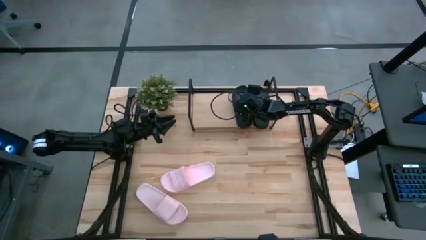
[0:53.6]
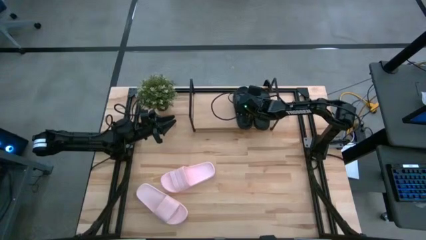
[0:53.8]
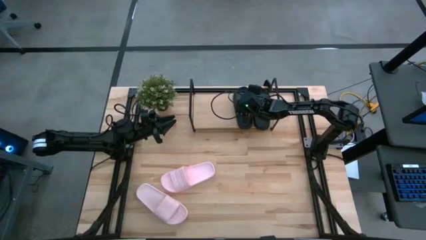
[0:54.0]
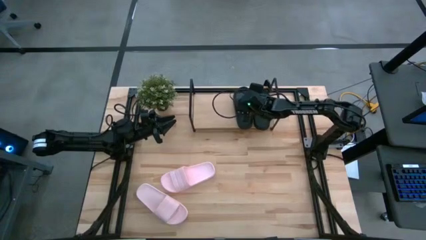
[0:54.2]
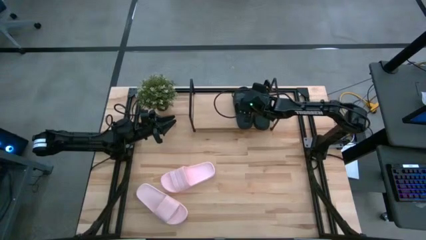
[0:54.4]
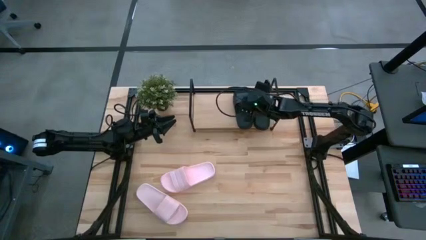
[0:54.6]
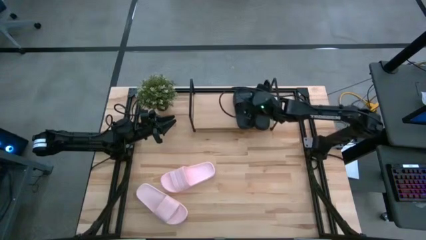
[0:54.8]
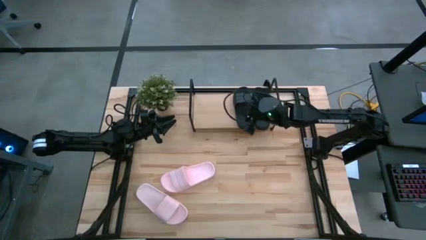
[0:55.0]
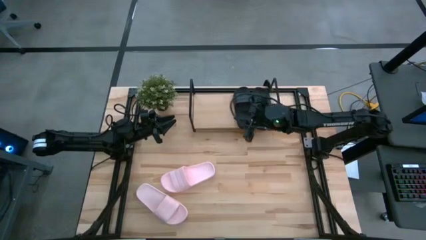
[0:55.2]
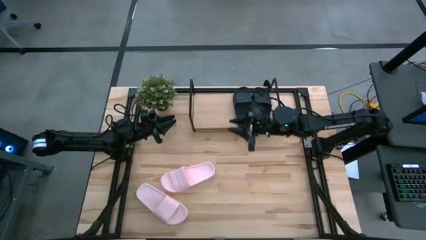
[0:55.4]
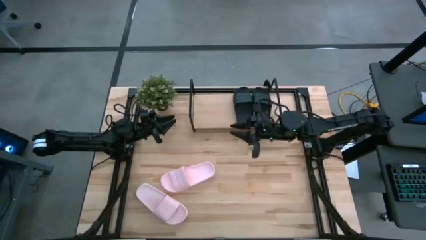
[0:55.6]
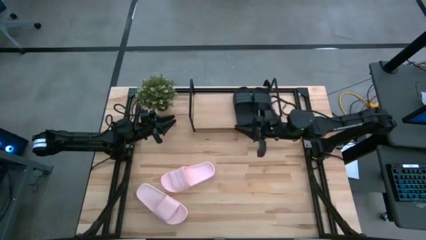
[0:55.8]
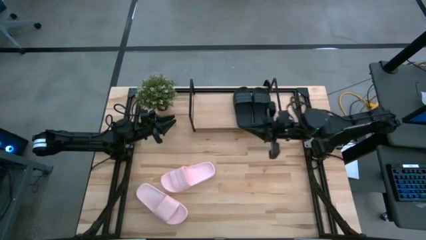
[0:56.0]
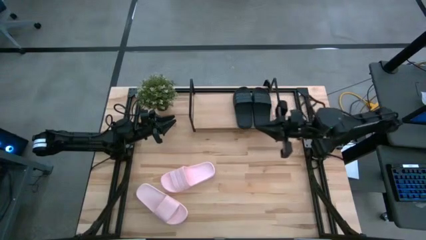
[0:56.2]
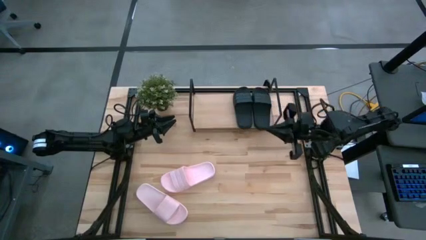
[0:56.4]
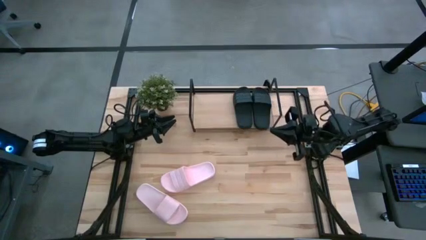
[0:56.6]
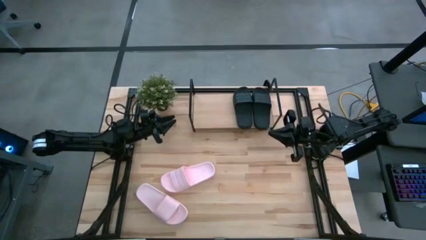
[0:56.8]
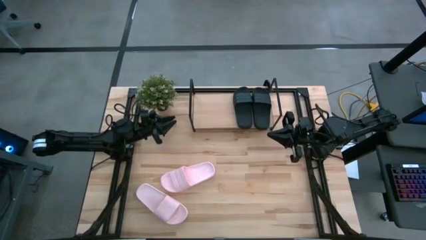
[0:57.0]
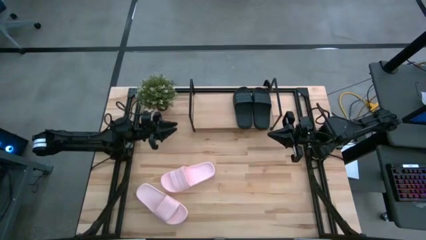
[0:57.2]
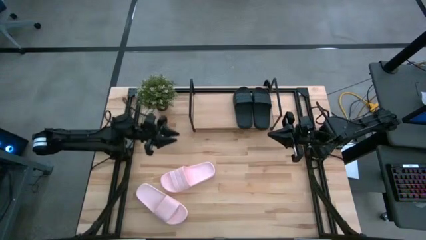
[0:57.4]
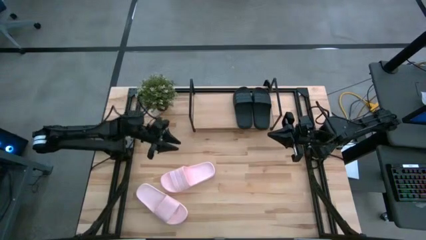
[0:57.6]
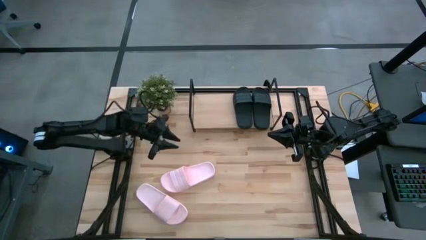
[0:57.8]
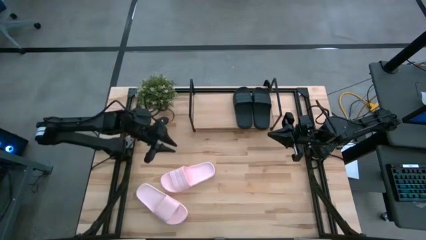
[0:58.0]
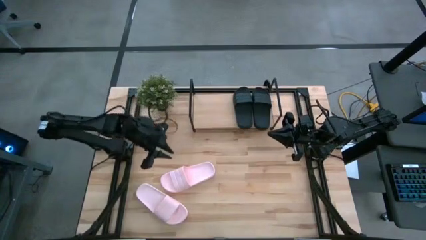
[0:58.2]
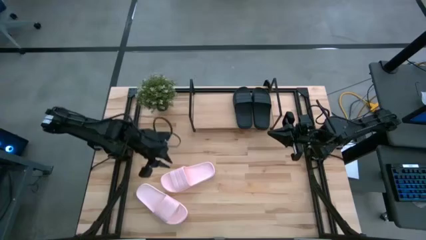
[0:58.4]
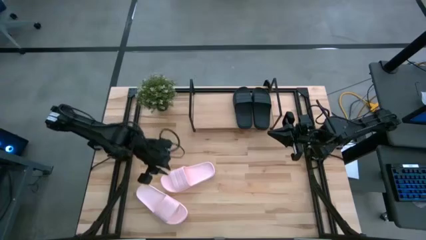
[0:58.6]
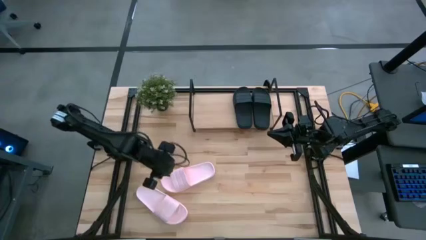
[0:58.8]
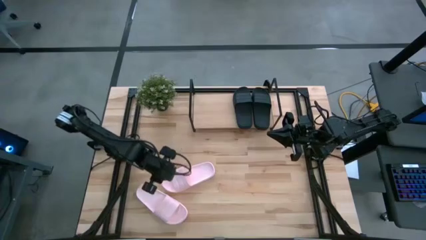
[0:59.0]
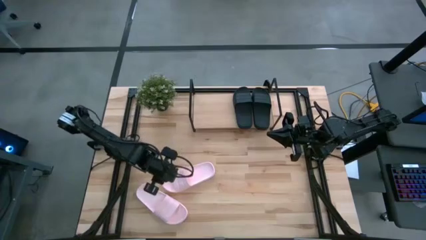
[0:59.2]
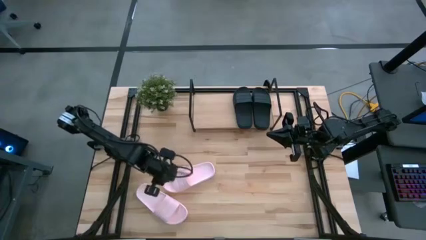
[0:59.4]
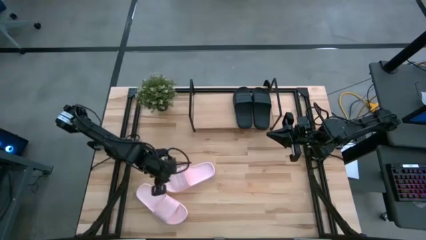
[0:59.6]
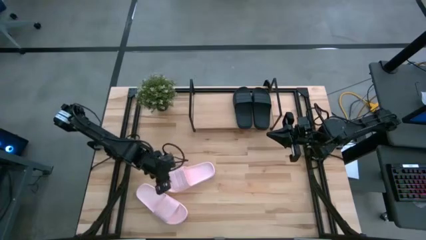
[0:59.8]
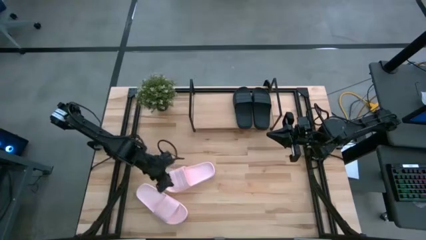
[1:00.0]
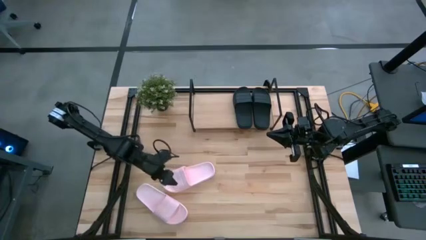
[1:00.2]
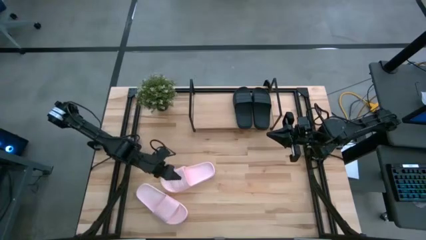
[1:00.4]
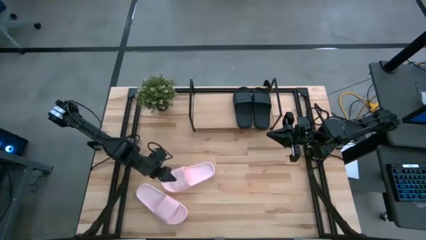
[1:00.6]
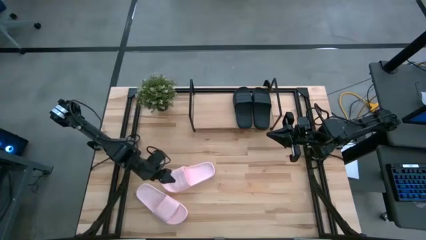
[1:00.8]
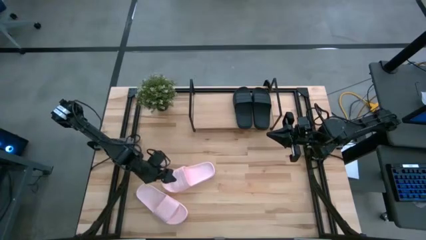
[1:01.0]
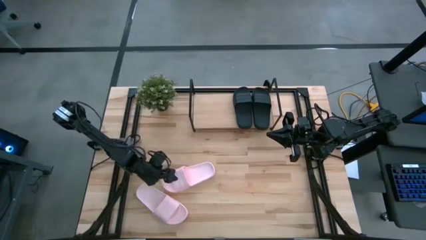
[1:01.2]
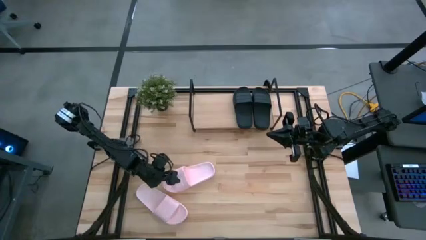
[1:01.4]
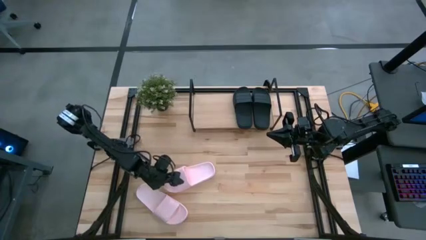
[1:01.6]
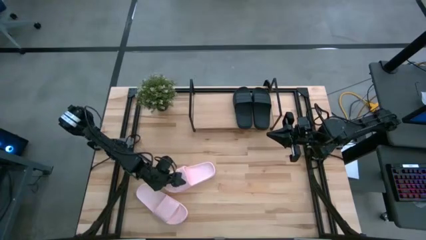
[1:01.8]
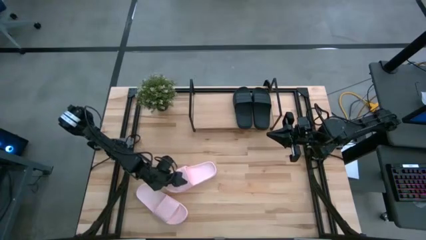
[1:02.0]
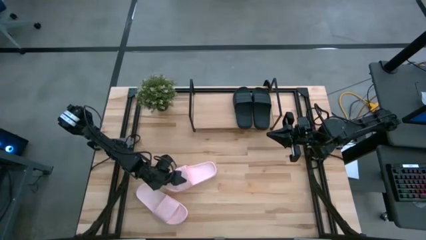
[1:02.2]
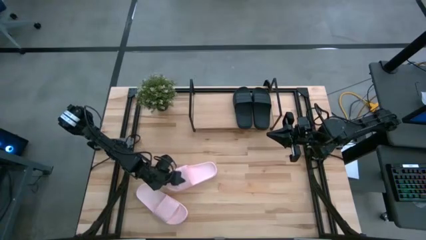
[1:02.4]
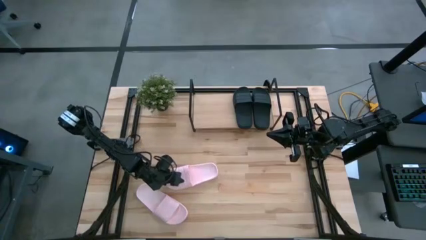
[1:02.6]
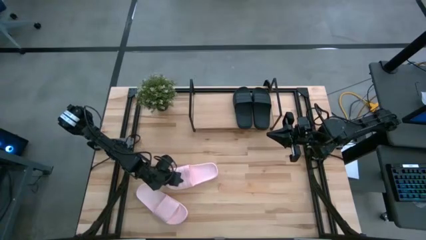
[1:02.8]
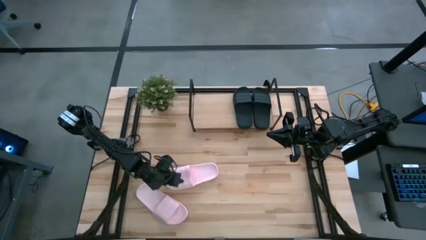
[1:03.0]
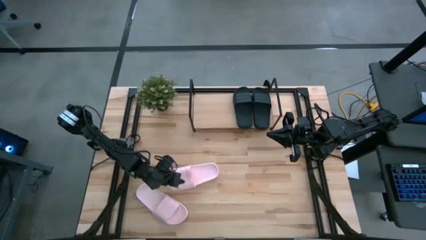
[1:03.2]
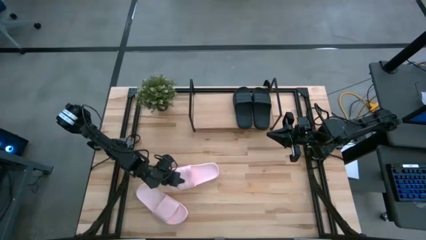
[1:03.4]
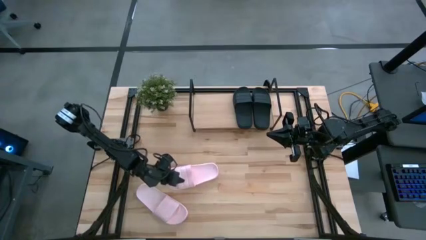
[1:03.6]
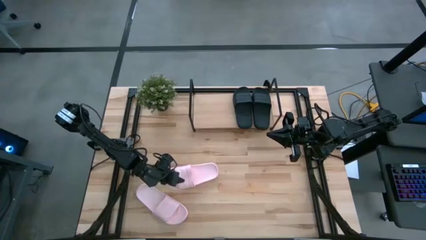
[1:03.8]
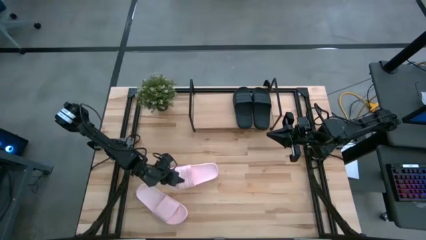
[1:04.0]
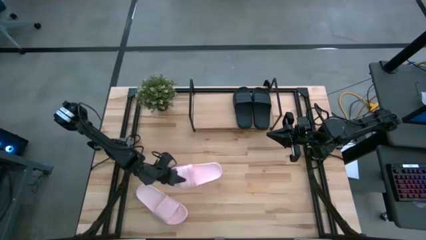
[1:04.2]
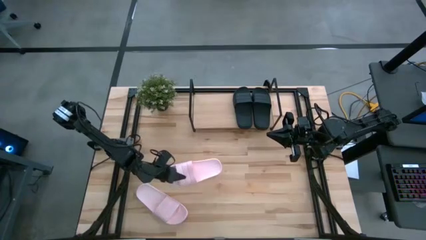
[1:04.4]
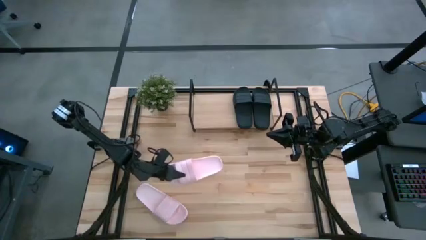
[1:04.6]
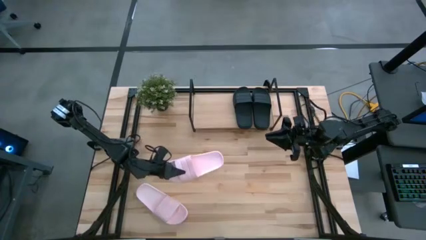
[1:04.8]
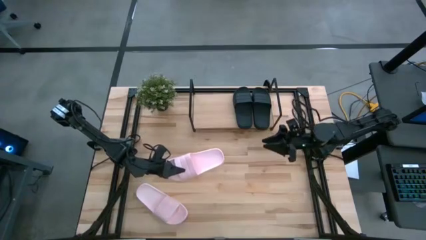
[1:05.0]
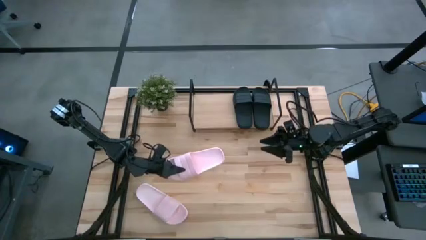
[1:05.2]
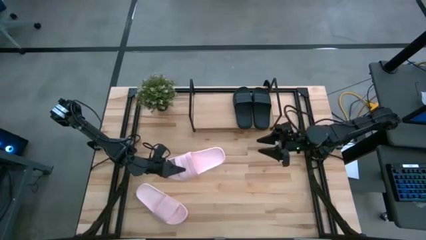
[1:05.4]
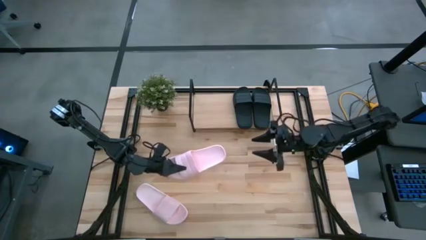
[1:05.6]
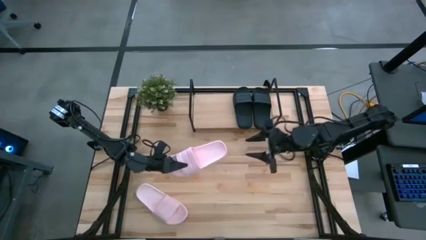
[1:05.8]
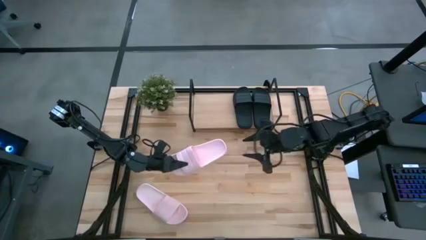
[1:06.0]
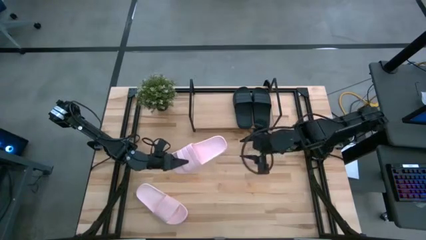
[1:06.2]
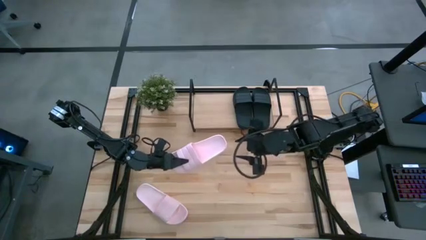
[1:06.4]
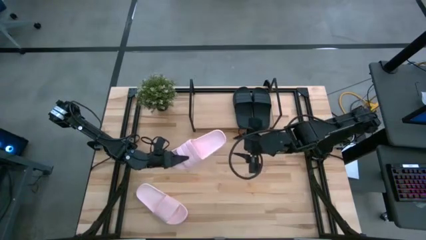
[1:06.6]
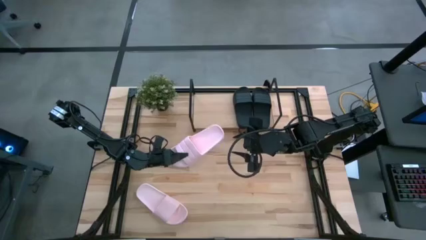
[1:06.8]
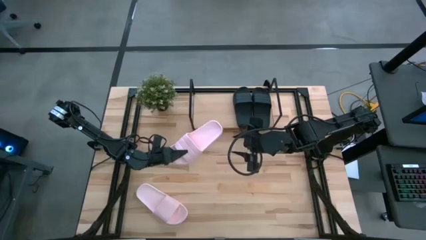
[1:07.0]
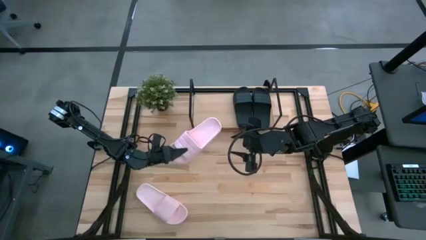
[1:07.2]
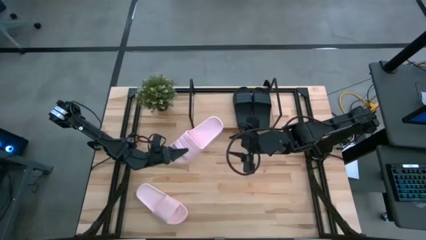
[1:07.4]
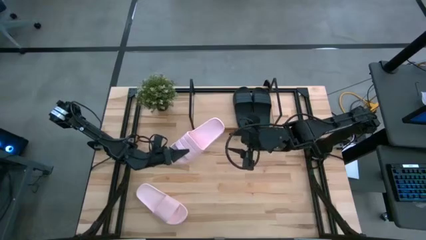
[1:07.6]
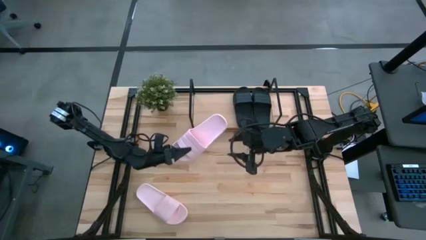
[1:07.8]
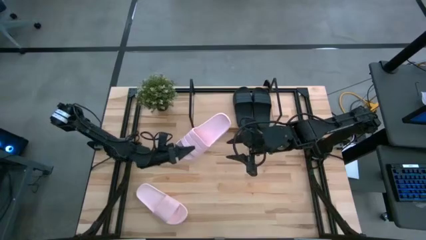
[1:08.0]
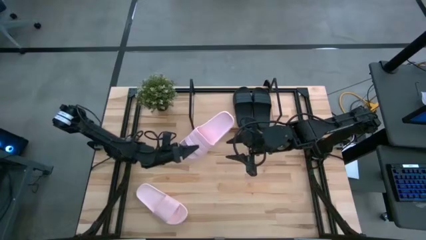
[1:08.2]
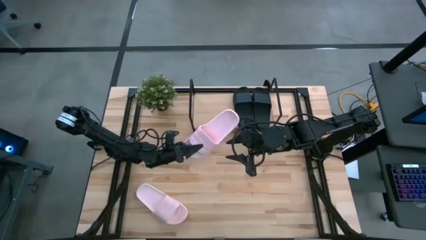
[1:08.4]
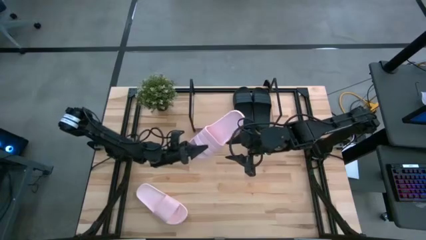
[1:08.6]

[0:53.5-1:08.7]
Task: Pick and place slides into the shelf
Put the top pink slipper on the shelf
